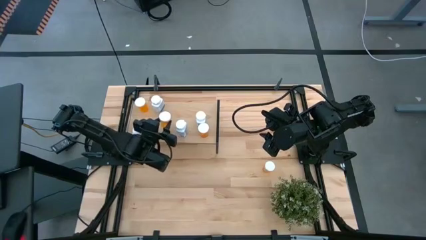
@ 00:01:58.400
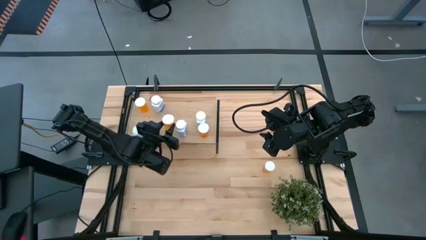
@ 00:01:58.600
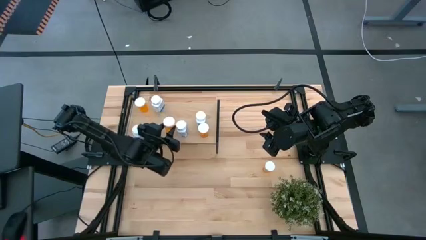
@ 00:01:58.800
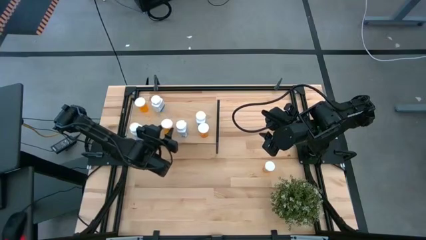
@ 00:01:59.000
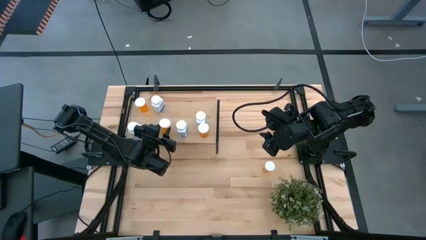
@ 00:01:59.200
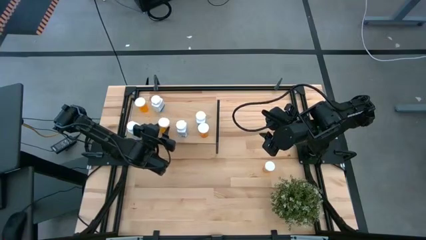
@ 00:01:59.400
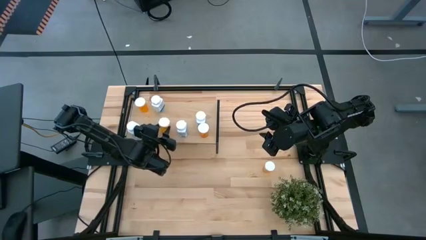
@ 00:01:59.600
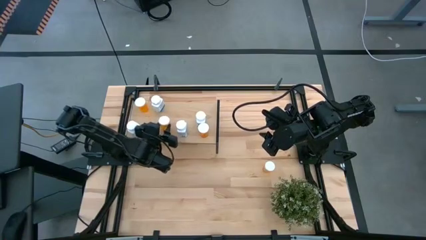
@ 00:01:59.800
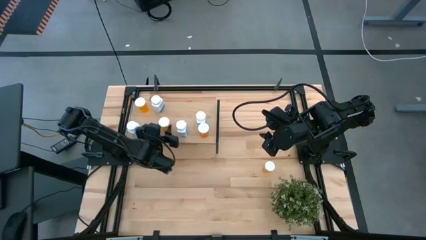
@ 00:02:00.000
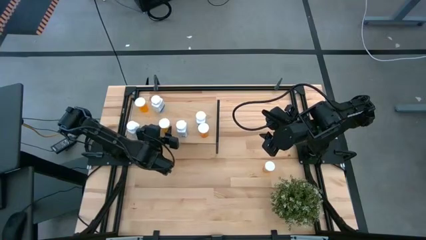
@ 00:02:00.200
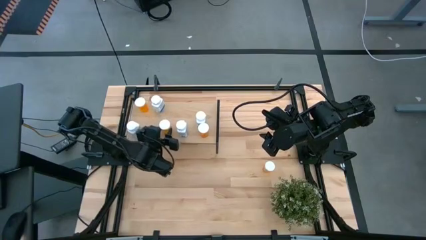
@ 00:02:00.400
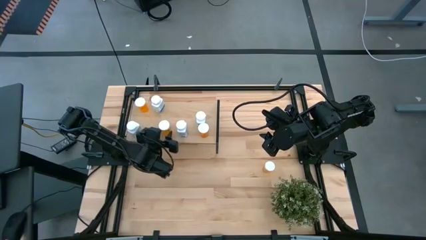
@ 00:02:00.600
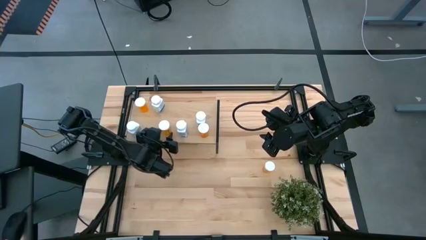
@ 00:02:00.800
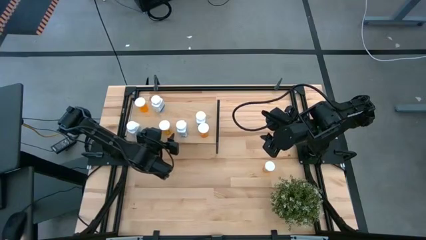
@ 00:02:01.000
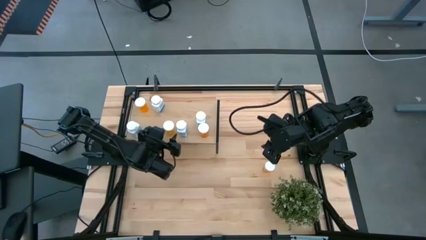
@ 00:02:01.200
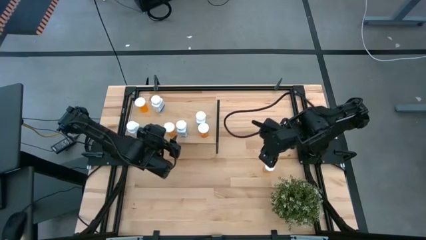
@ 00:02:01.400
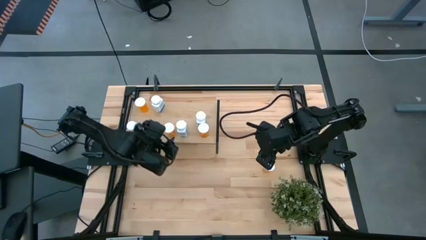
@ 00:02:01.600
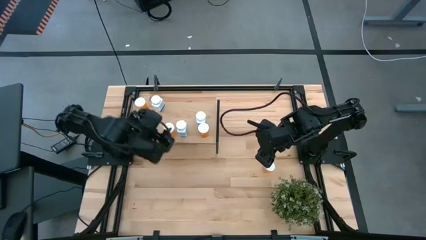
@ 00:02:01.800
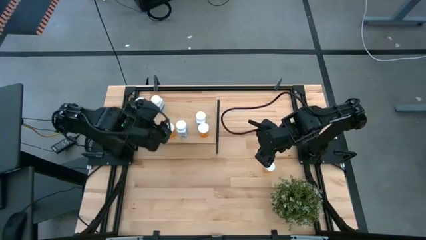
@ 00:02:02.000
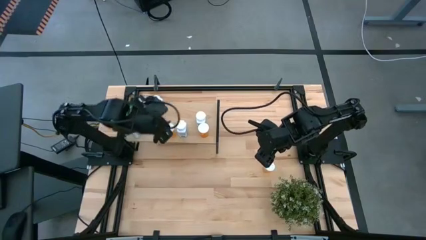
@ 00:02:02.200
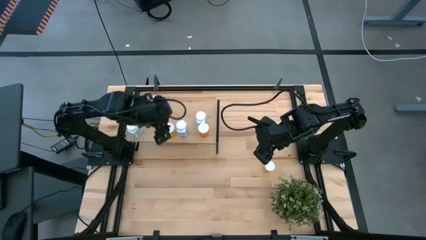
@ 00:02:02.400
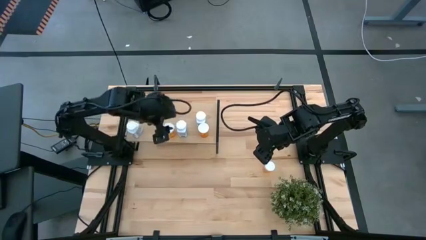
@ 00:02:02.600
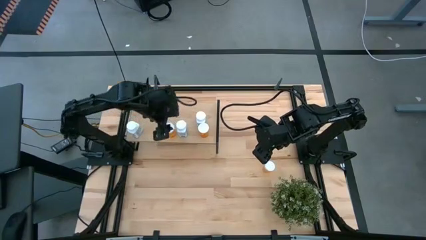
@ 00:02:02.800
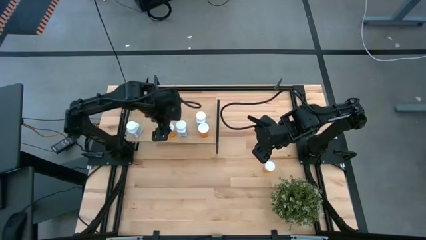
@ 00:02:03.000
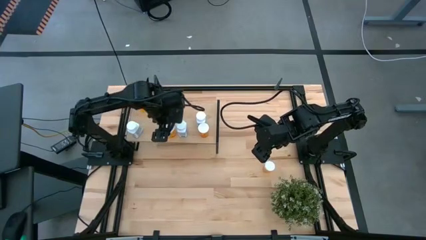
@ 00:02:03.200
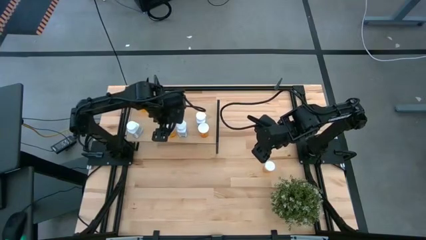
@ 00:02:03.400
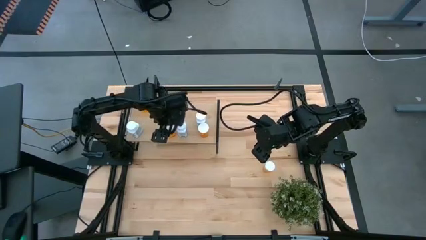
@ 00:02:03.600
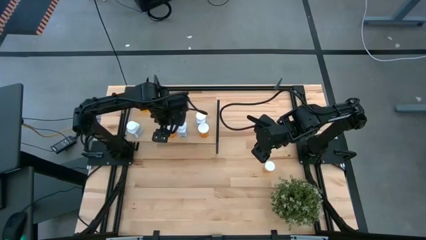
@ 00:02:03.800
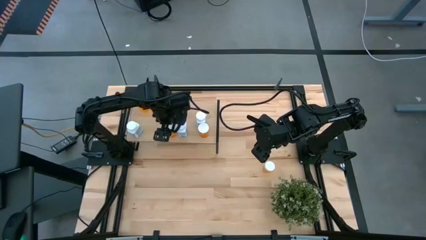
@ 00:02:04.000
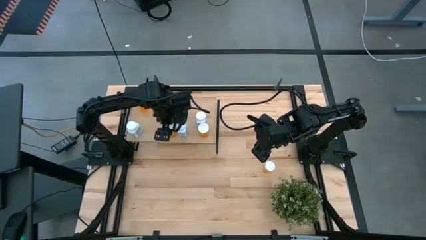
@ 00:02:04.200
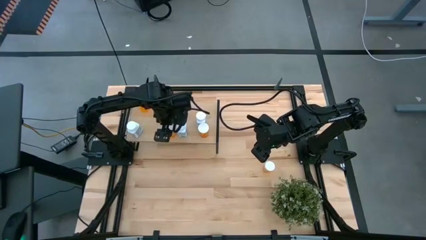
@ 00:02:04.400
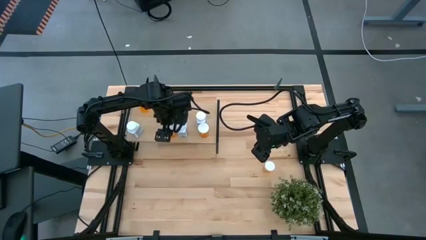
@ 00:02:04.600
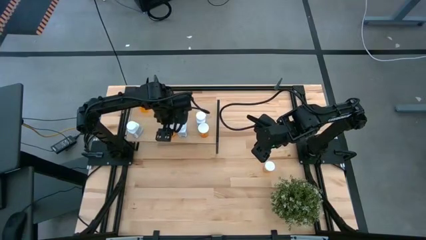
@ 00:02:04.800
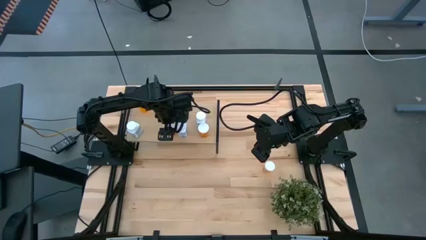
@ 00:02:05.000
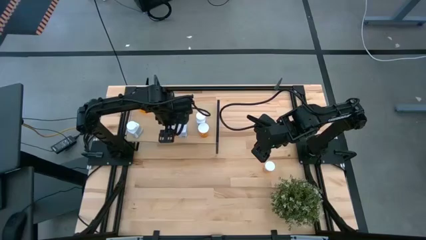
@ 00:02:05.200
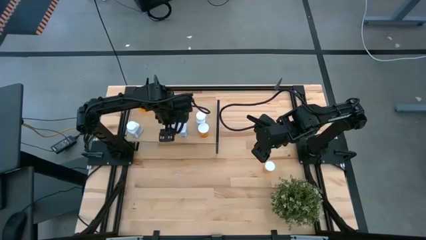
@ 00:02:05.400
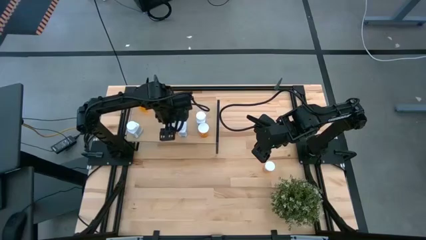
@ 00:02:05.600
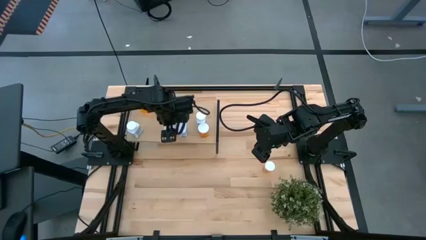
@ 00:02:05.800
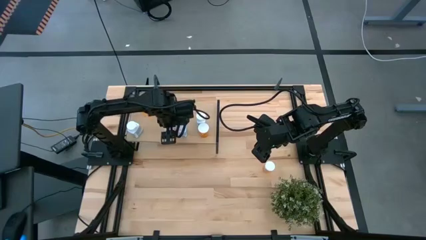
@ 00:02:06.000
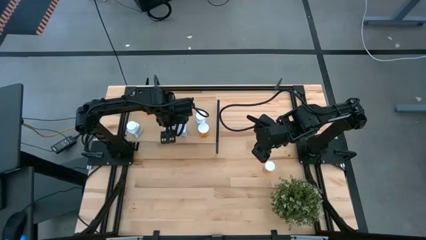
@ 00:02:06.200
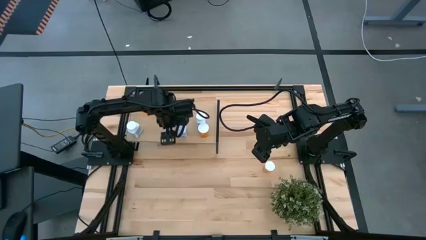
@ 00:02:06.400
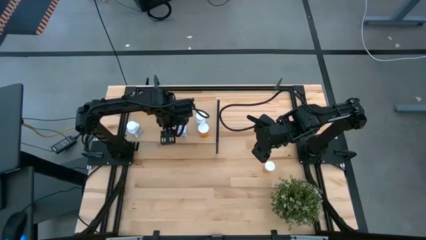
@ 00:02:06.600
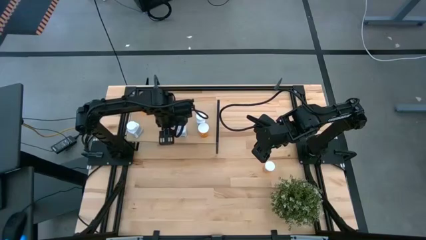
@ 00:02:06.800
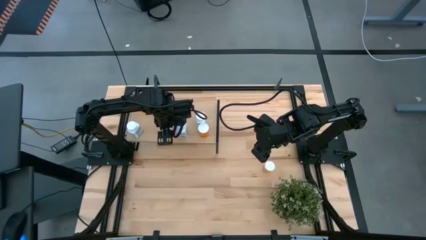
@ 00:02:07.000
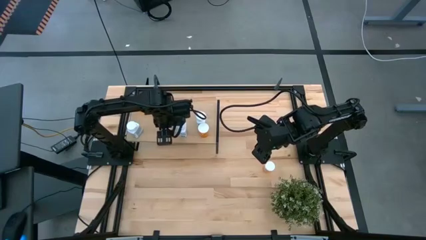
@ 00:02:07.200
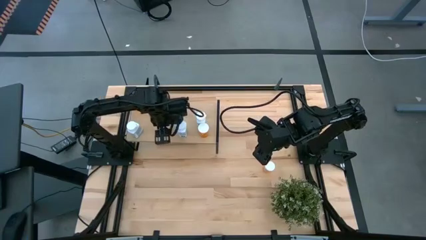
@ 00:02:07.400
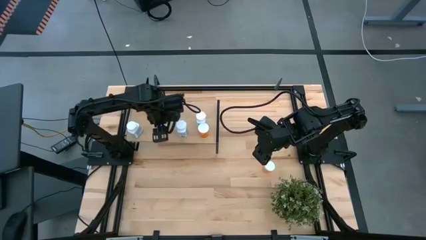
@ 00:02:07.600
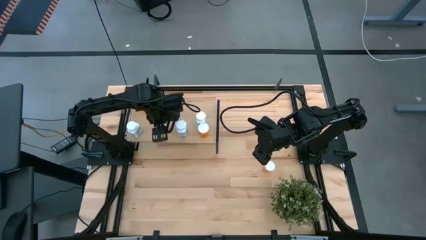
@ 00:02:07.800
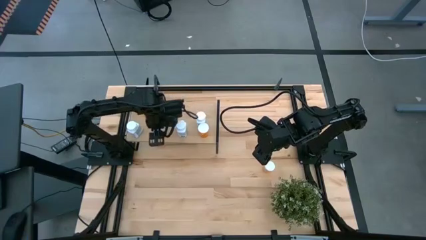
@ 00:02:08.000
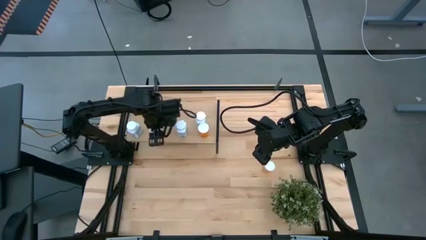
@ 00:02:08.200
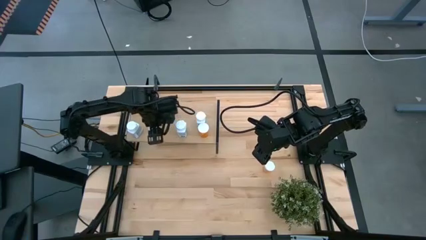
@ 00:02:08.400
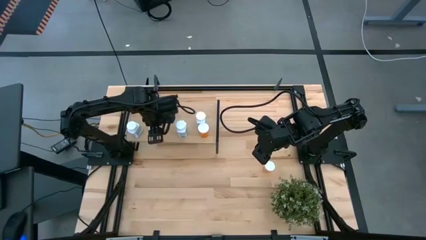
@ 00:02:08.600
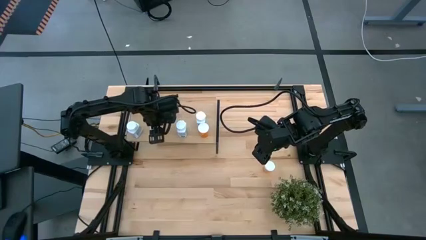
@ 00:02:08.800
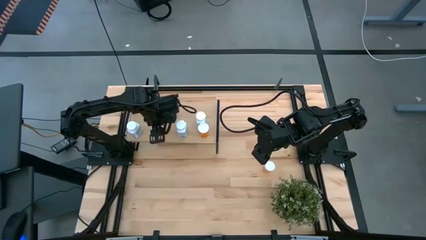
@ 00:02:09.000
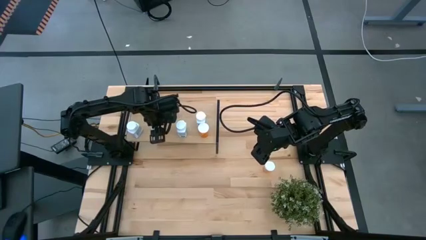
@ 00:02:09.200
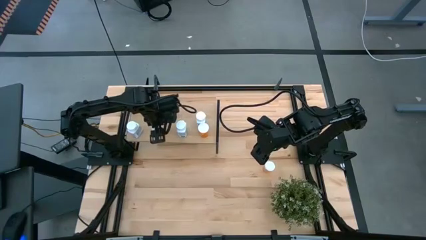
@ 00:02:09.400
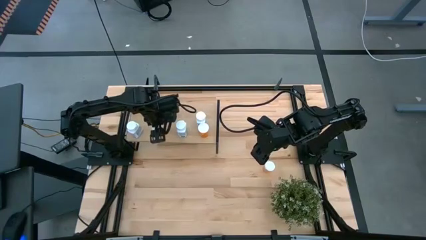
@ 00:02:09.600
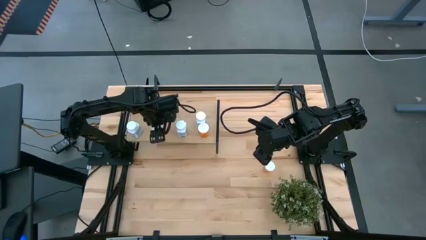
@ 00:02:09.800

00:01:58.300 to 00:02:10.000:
Task: Pick and place medicine bottles onto shelf by color
Put the orange pill bottle on the shelf

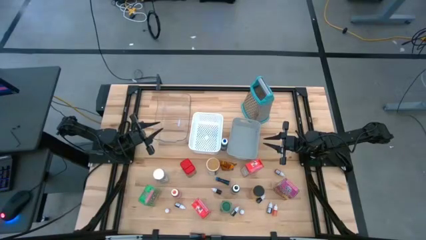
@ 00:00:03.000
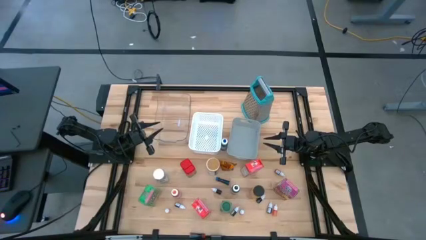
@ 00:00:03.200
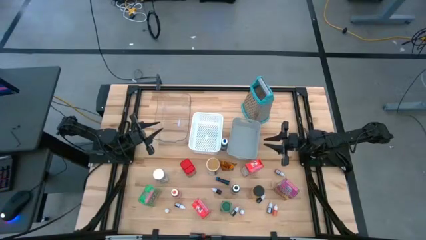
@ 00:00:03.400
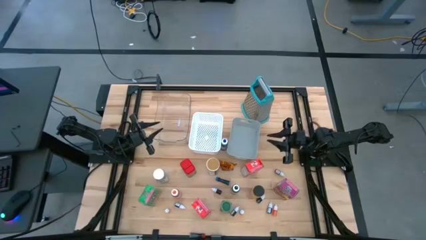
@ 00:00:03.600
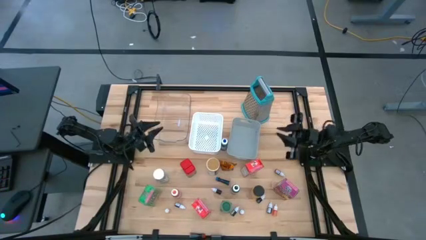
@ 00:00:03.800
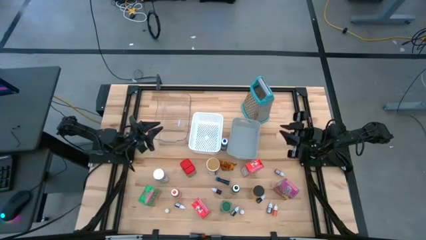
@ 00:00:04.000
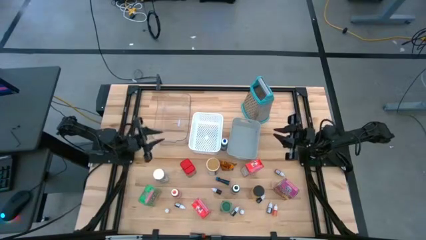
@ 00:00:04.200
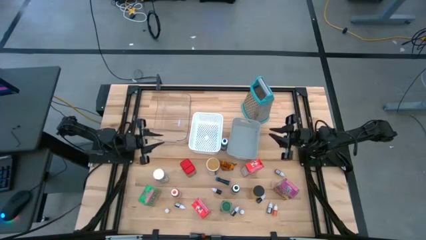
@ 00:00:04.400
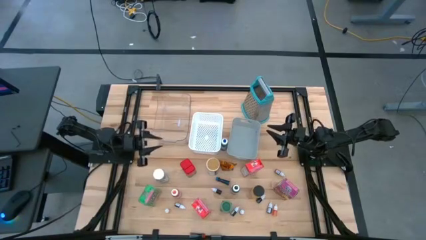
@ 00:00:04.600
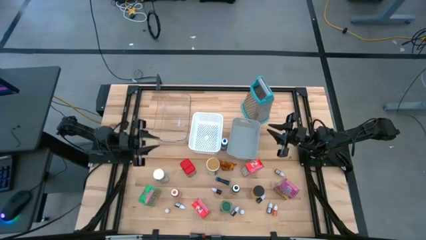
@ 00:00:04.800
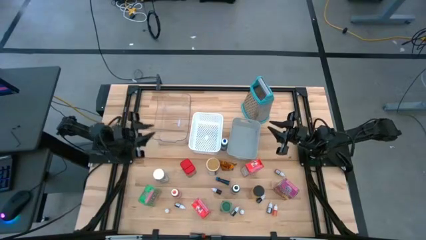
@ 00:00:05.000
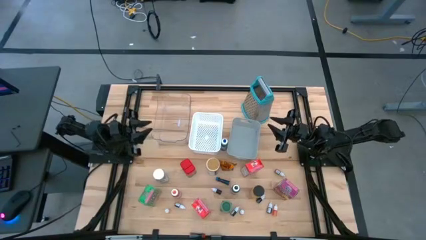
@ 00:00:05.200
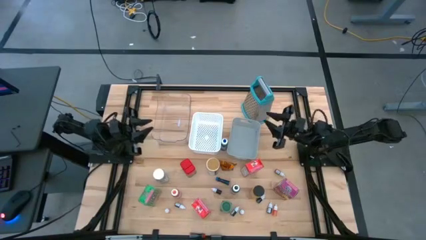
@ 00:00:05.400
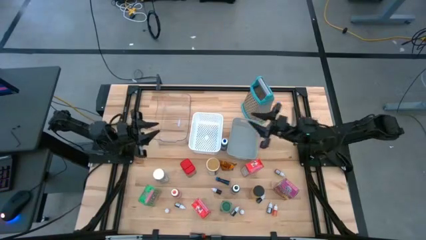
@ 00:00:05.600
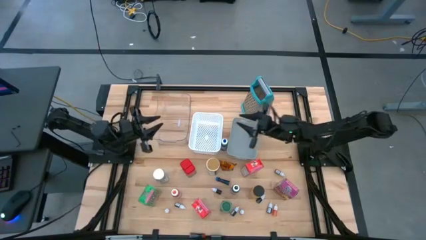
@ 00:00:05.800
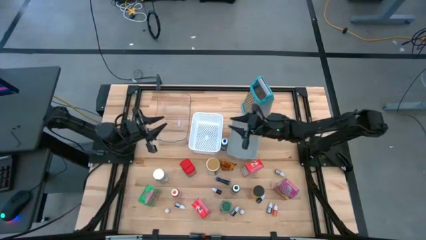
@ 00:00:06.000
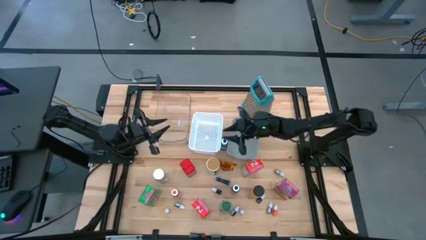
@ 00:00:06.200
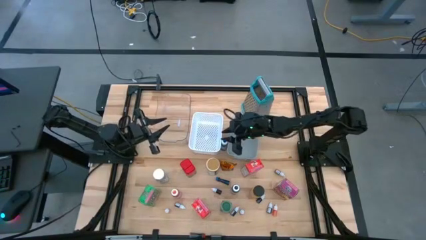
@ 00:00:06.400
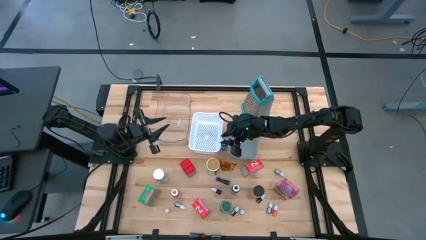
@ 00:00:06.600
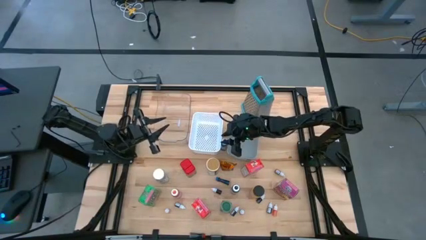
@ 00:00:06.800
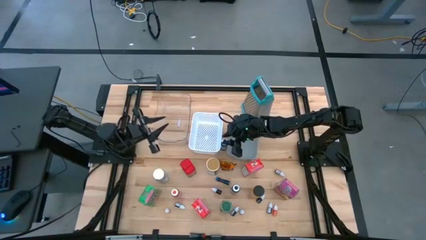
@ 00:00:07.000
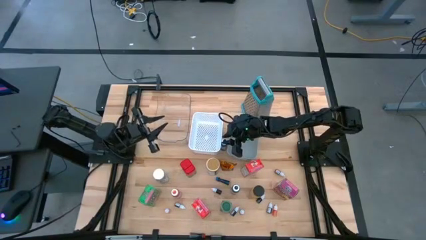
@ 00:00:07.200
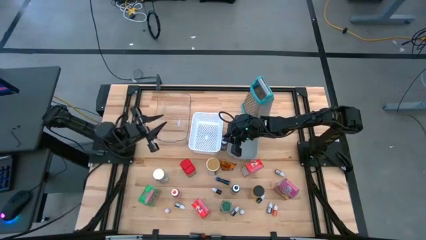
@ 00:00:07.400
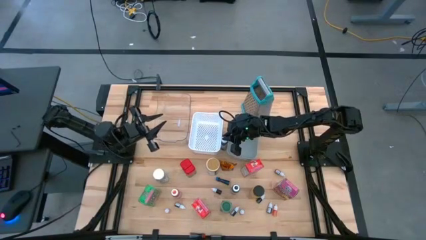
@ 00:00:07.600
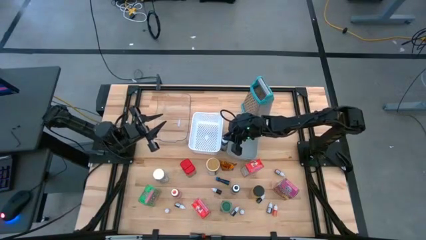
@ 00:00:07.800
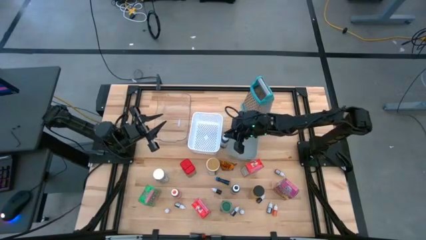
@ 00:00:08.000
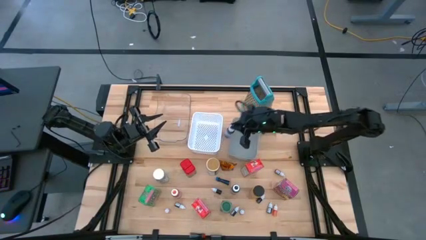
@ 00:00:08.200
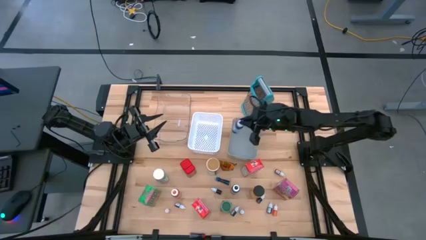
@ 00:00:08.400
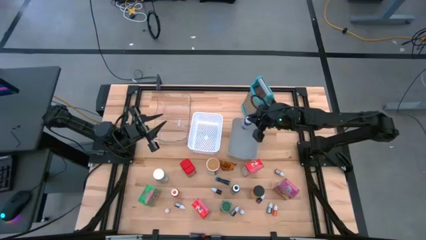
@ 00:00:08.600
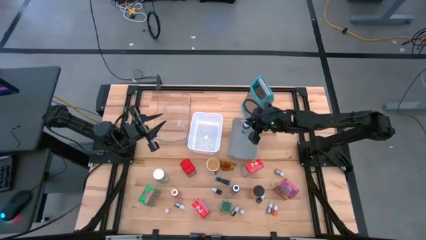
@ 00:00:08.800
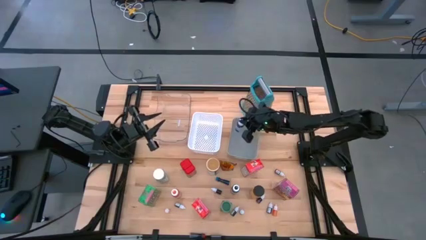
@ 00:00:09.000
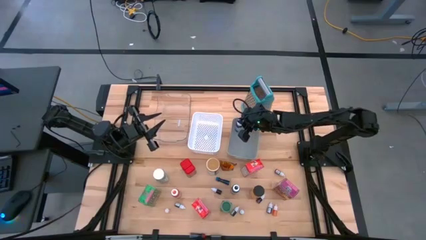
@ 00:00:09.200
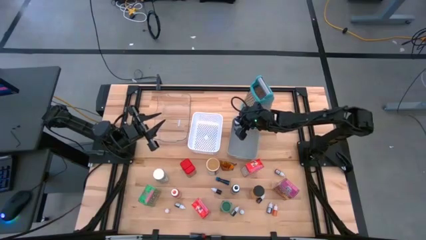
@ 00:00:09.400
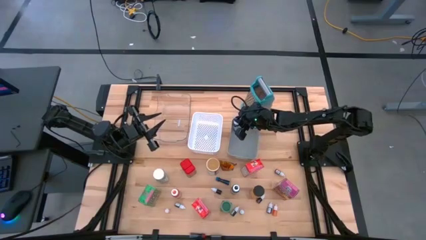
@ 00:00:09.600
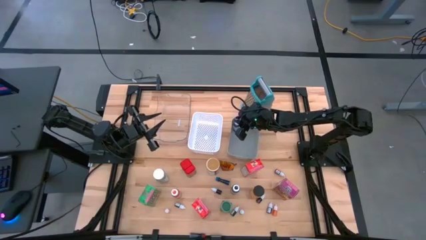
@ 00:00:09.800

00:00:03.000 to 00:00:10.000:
Task: Pick & Place Kitchen Items
Put the large blue food coloring into the gray bin
